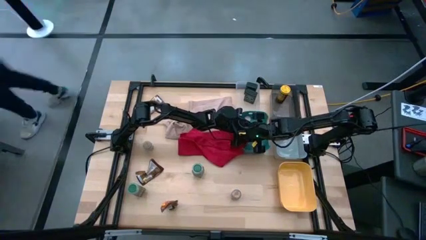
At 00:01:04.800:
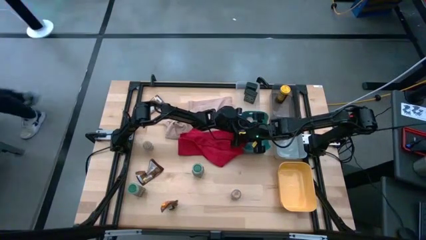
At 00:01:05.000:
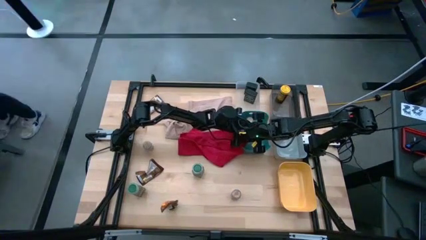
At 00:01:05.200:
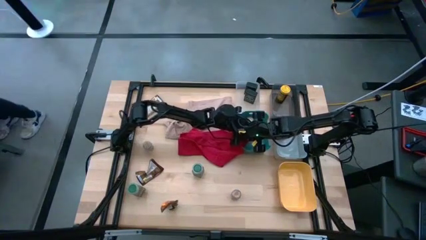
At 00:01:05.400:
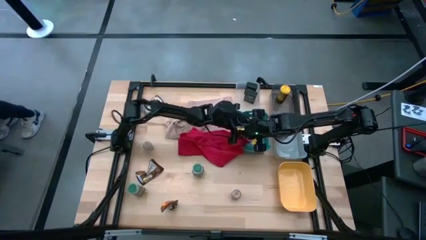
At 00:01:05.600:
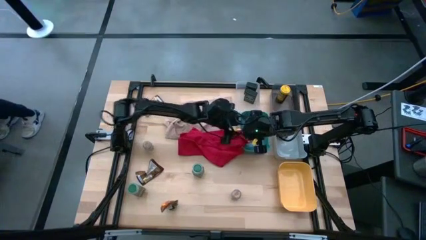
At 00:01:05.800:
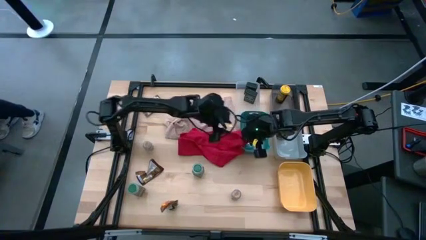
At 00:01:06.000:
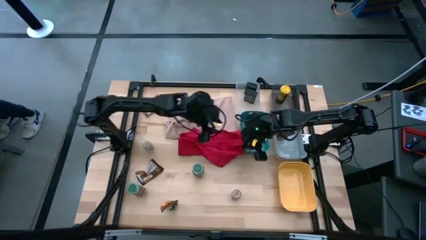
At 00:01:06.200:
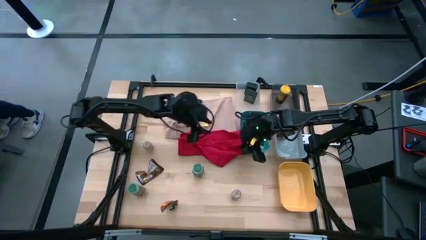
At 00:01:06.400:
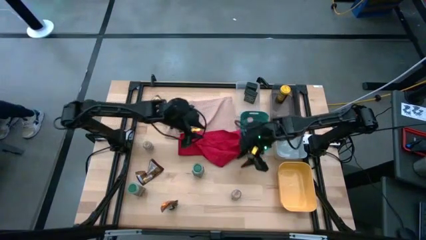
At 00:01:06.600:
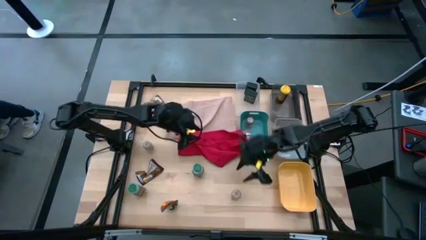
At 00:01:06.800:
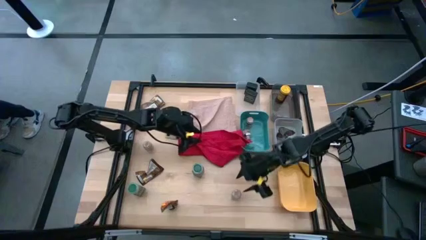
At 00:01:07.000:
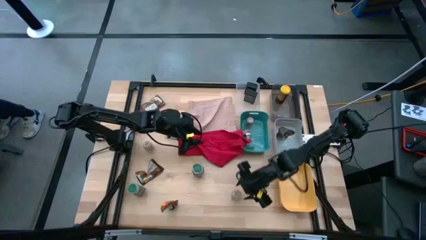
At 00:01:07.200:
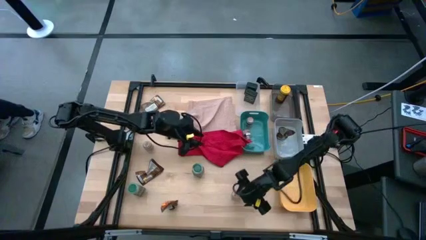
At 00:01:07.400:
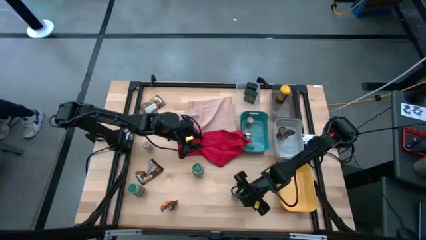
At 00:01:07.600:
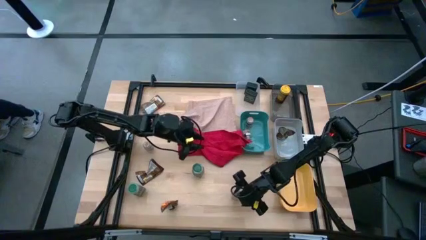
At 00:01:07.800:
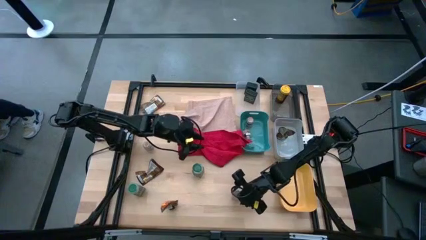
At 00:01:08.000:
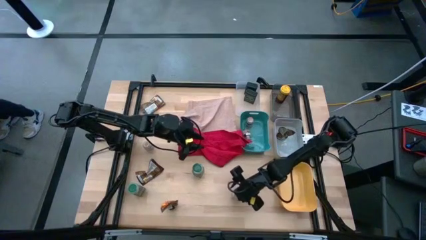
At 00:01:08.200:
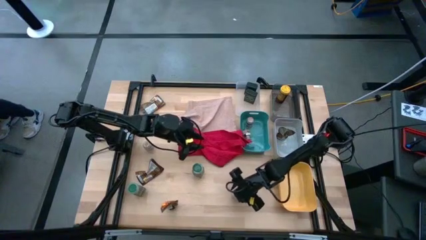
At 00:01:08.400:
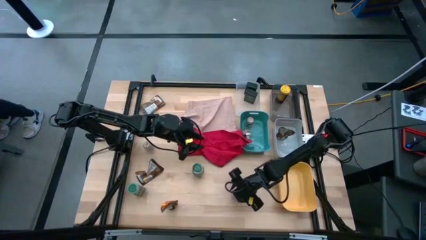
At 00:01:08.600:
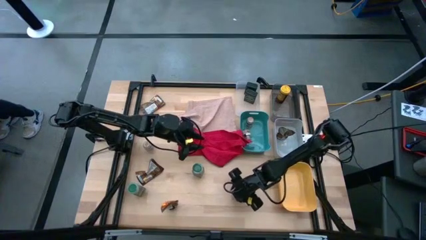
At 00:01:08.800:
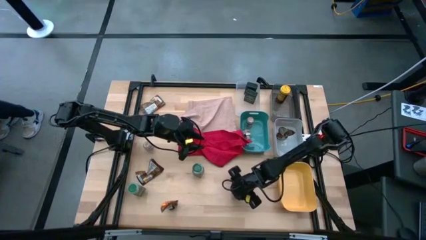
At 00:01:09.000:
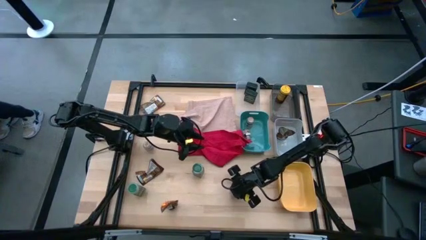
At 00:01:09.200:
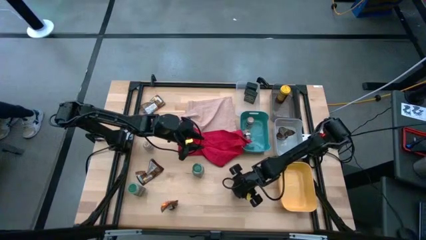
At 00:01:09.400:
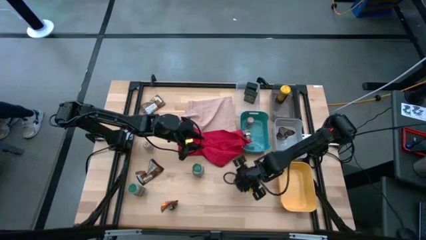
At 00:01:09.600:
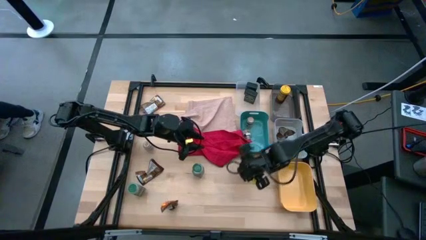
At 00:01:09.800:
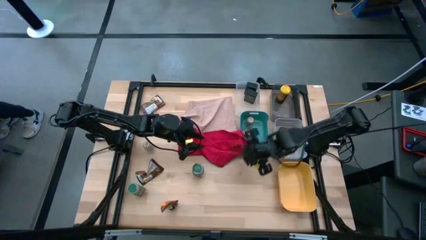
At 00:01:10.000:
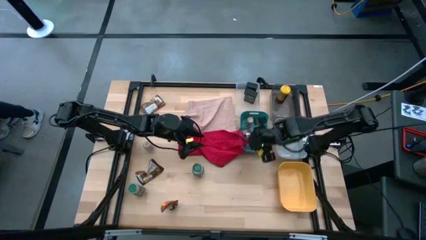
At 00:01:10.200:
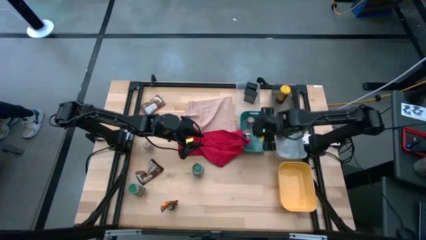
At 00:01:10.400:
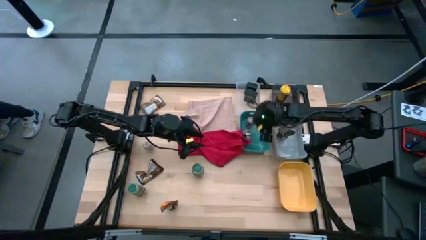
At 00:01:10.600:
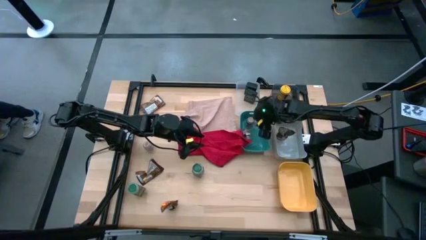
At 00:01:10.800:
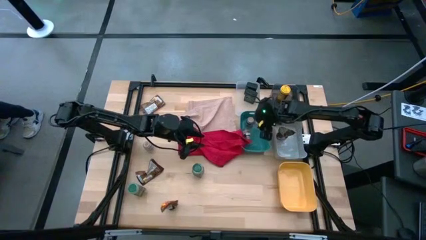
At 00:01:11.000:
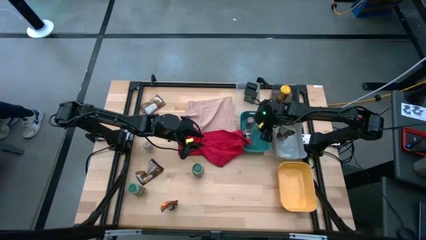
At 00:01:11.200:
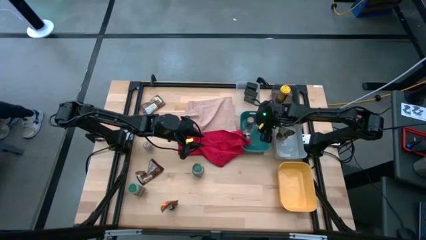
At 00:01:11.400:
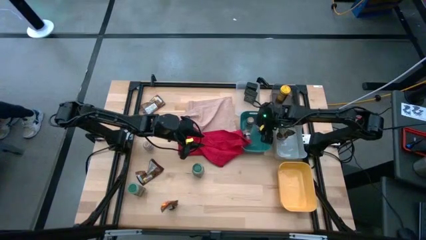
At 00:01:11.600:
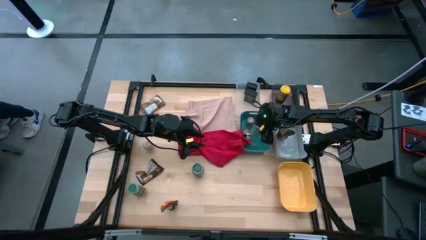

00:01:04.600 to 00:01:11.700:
Task: Sort spices by type
Put the bottom transparent seasoning bottle into the blue bin

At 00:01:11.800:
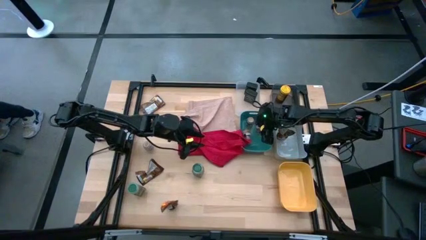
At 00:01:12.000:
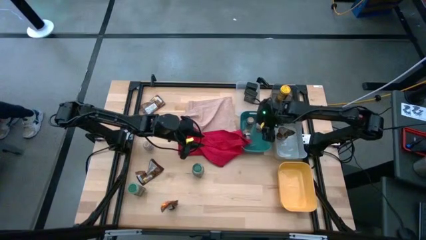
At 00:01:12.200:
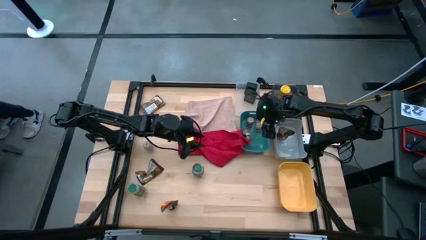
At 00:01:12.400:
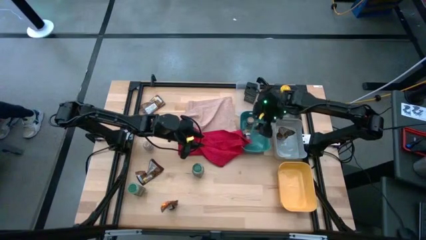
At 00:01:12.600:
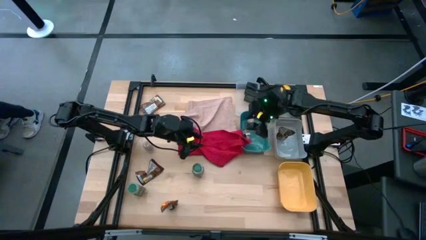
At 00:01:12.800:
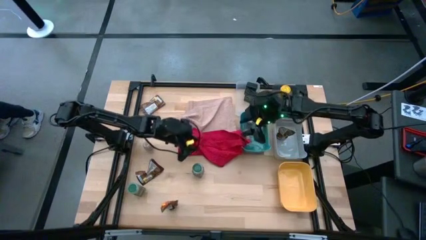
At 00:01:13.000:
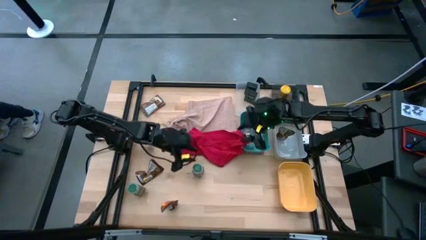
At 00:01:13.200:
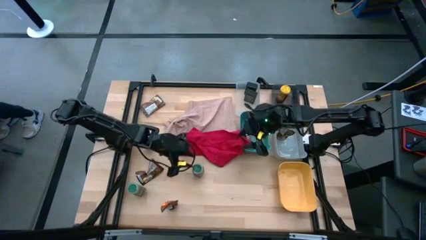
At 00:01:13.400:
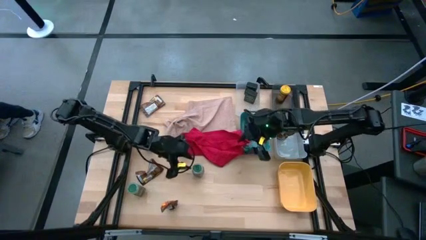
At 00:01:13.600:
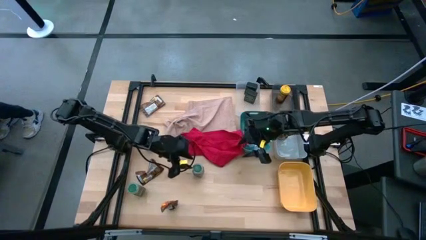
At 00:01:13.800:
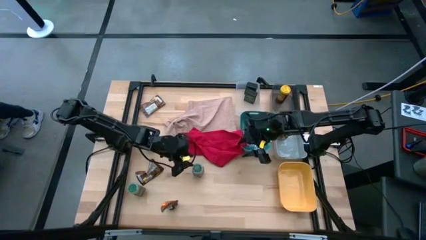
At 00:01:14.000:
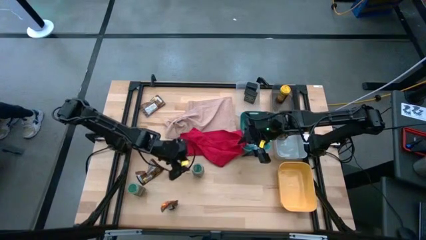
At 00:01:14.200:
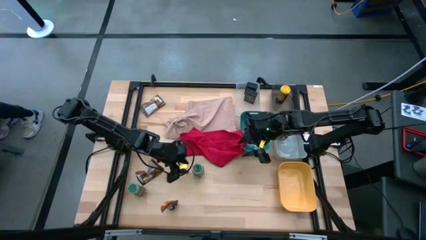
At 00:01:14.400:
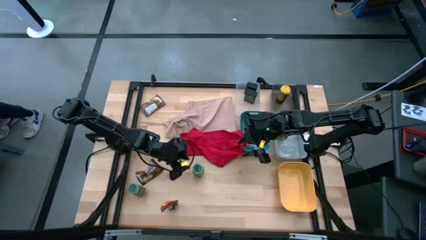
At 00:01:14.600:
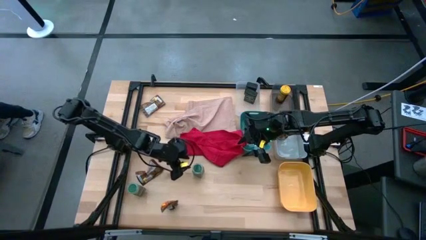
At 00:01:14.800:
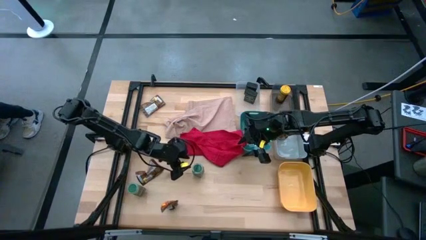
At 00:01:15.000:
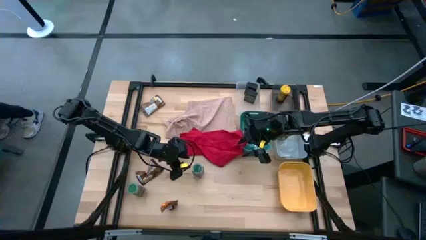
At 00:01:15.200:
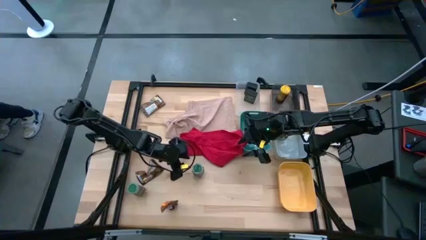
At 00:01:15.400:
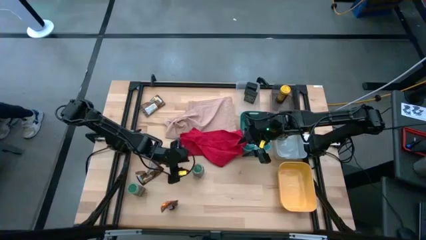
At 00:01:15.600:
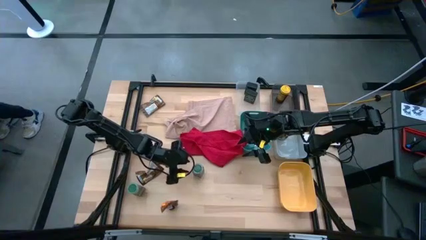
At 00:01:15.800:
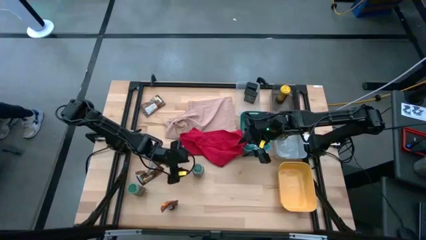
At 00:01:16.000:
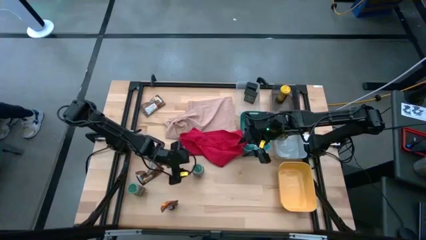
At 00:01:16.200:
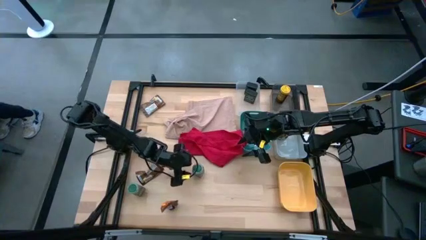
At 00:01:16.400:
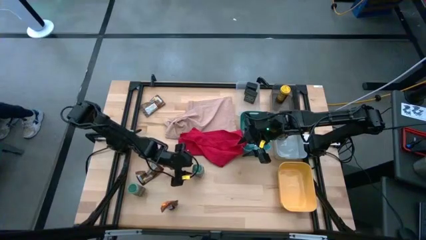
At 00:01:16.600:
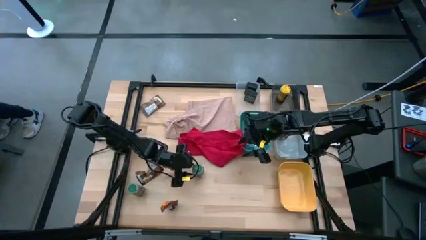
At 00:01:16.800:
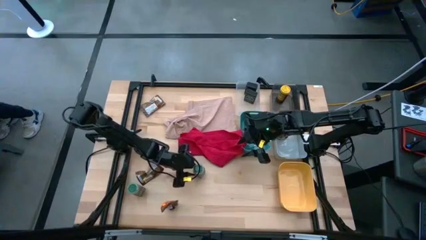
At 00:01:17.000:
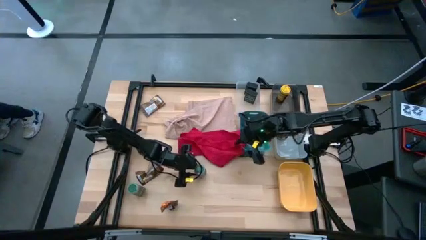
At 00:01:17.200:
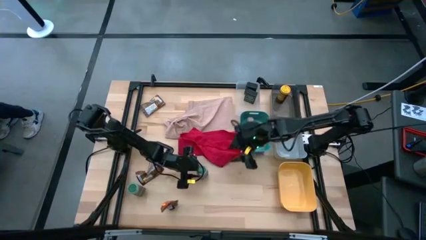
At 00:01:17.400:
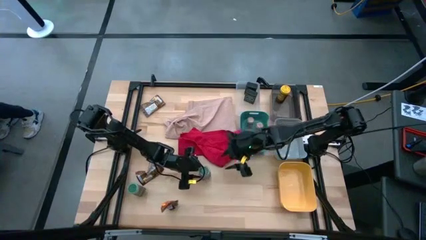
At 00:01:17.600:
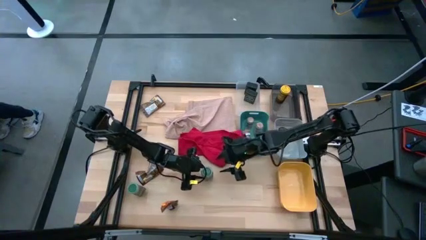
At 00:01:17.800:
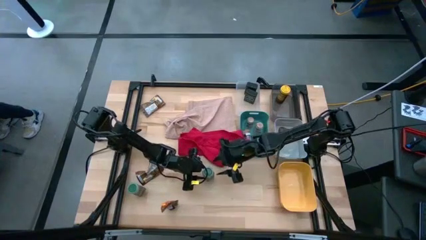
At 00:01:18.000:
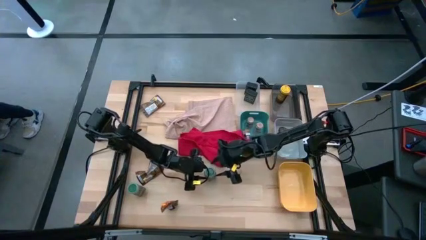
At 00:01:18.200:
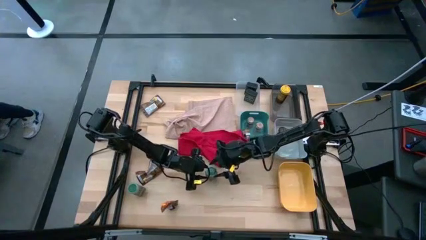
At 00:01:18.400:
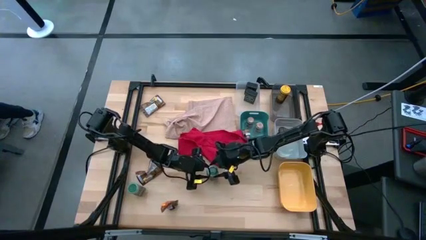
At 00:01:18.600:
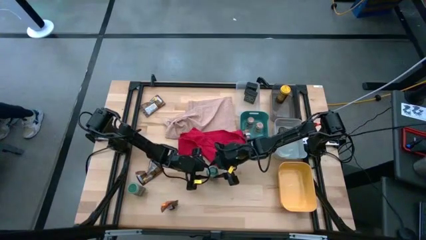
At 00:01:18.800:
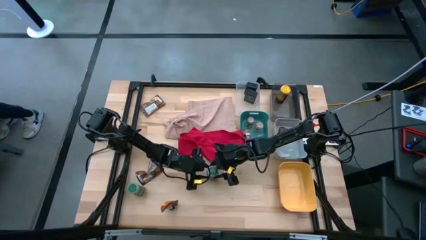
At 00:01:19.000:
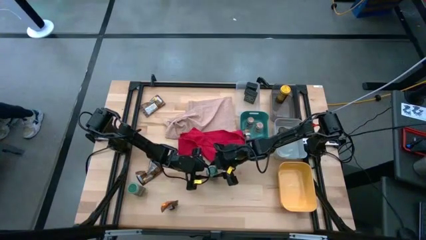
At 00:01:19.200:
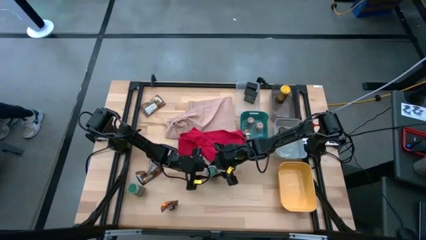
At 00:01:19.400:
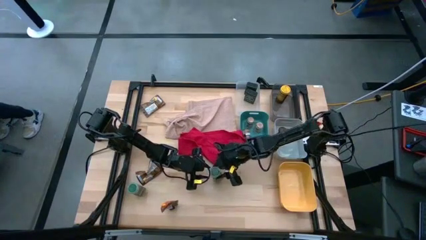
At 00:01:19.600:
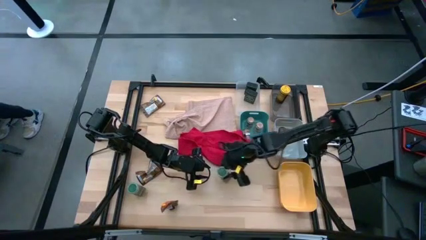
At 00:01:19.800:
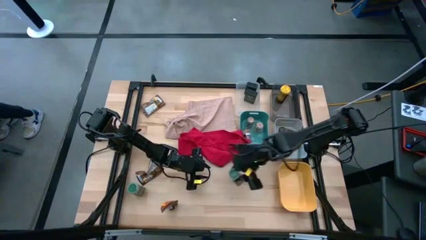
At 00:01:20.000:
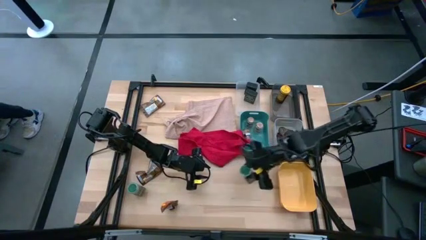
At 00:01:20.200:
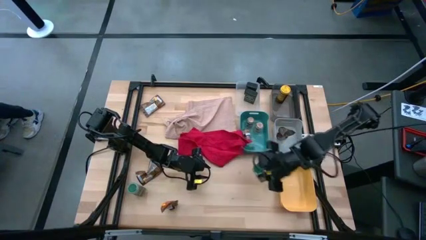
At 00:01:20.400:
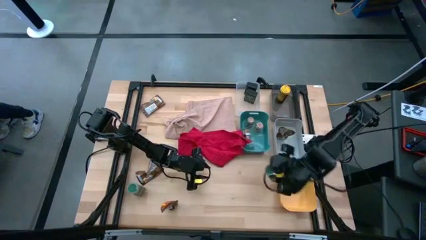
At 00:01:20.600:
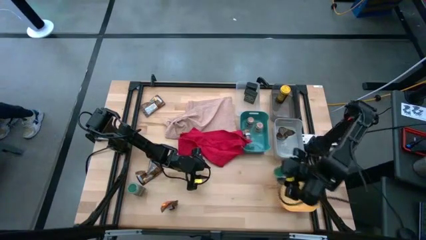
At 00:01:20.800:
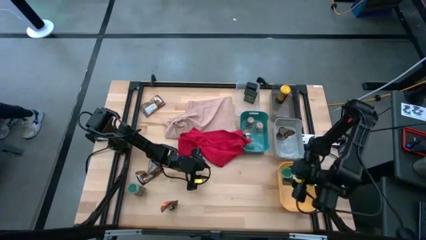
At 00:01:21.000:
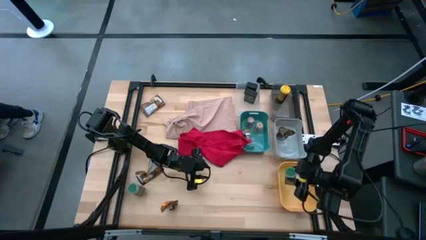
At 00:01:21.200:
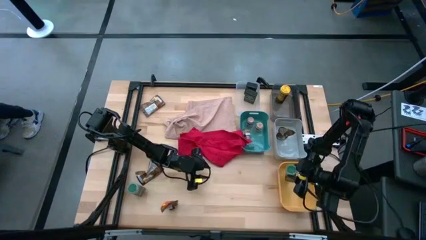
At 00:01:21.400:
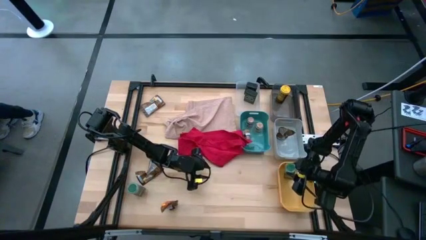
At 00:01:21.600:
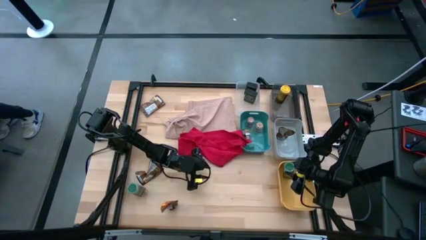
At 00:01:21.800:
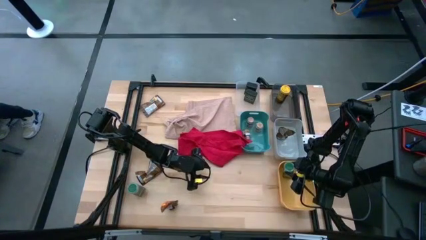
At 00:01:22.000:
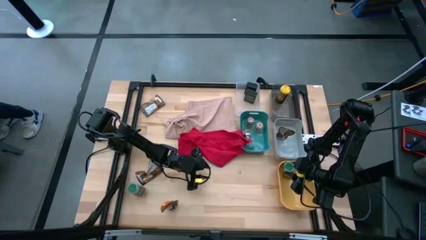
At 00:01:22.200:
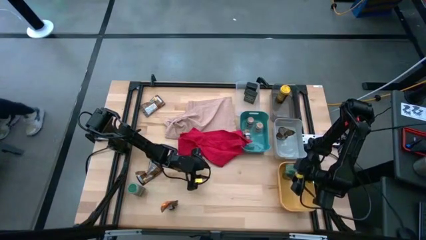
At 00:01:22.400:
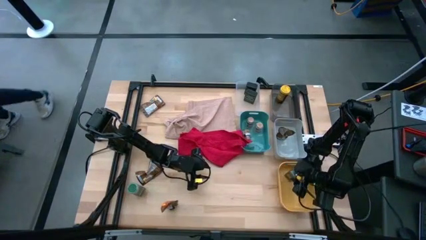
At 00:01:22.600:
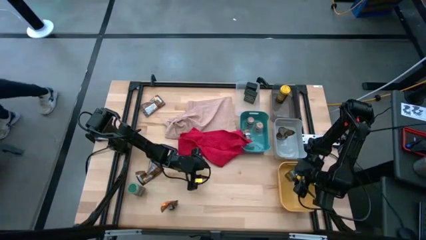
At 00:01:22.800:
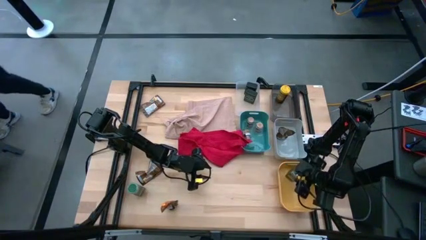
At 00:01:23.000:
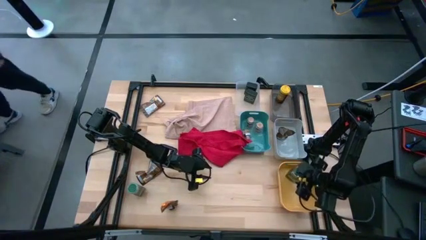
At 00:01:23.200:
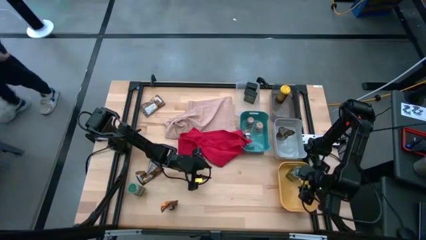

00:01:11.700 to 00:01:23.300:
Put the right dark green seasoning bottle into the yellow bin
